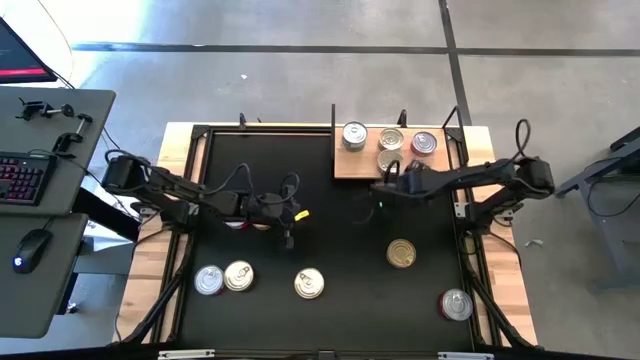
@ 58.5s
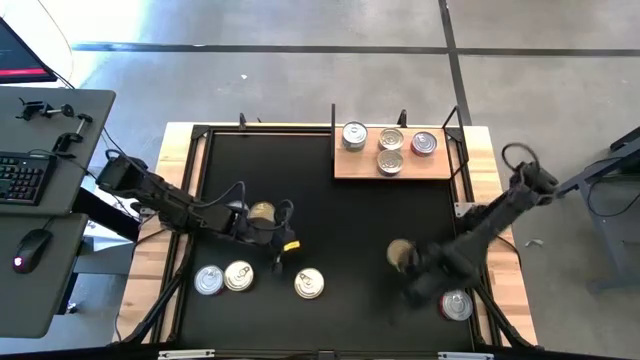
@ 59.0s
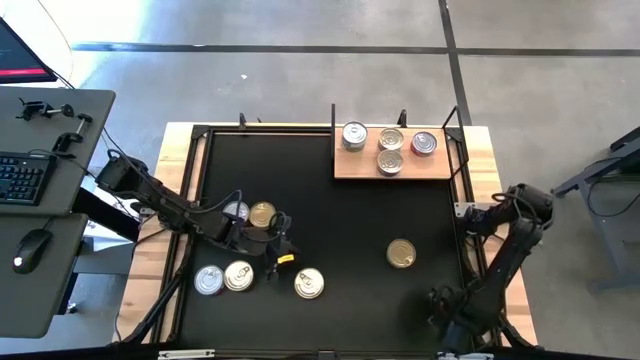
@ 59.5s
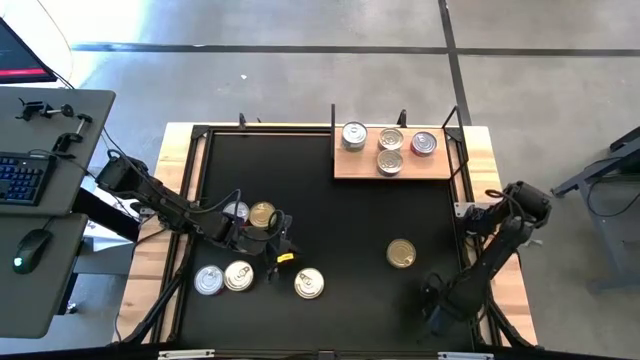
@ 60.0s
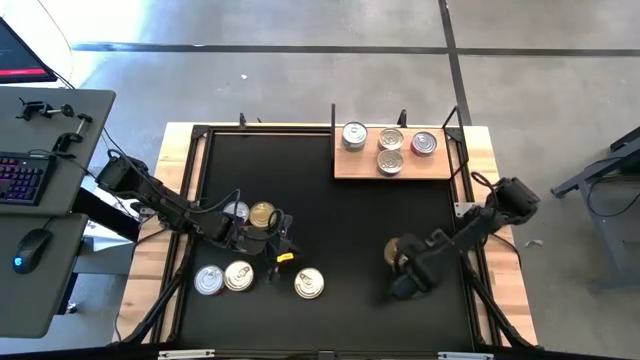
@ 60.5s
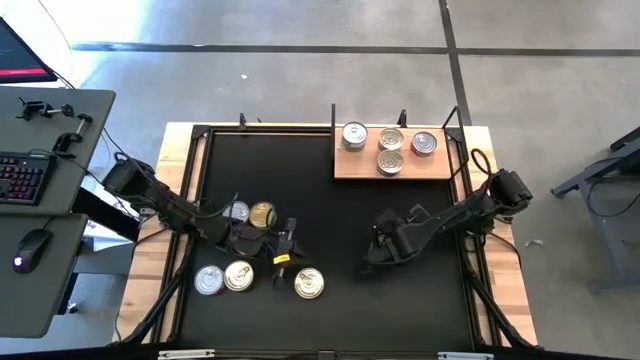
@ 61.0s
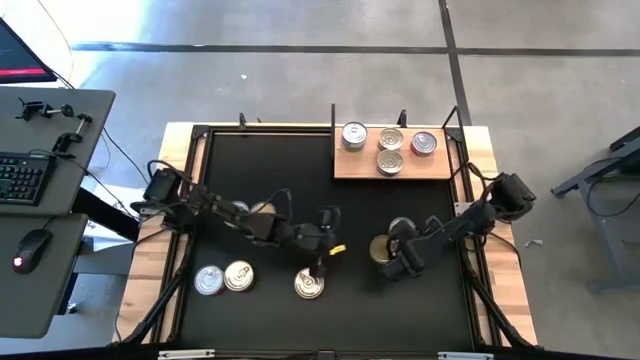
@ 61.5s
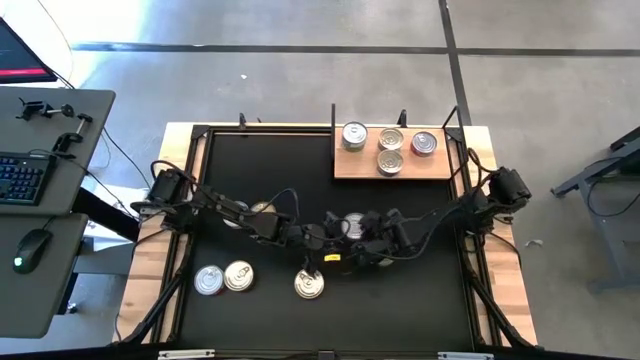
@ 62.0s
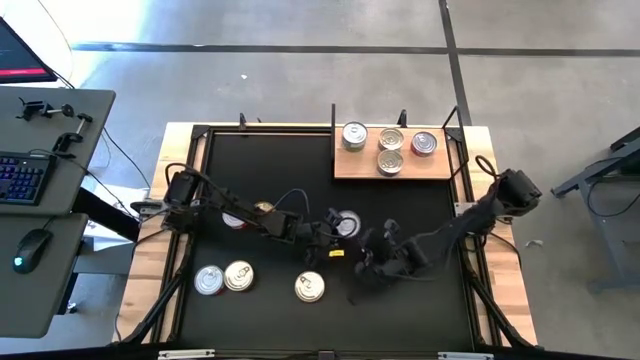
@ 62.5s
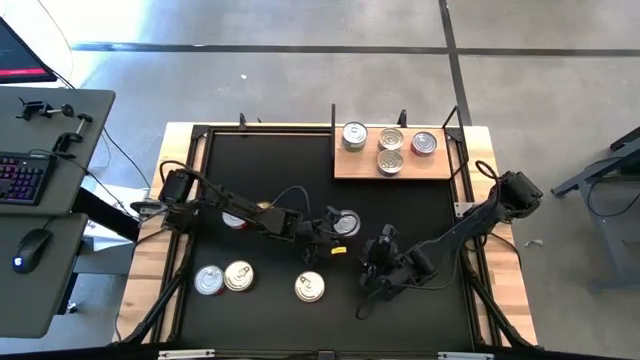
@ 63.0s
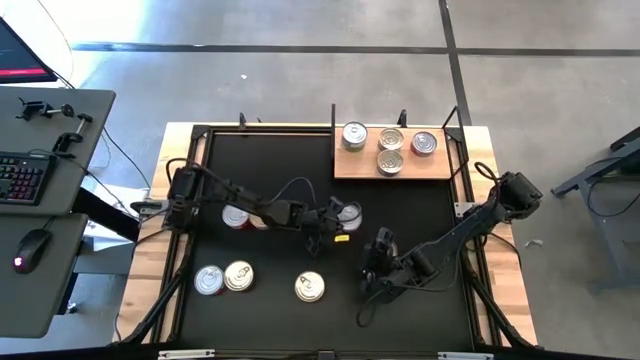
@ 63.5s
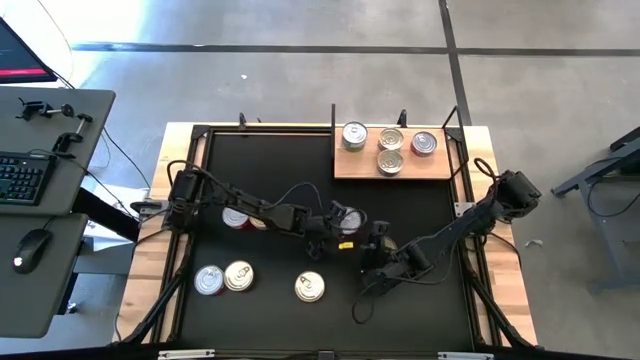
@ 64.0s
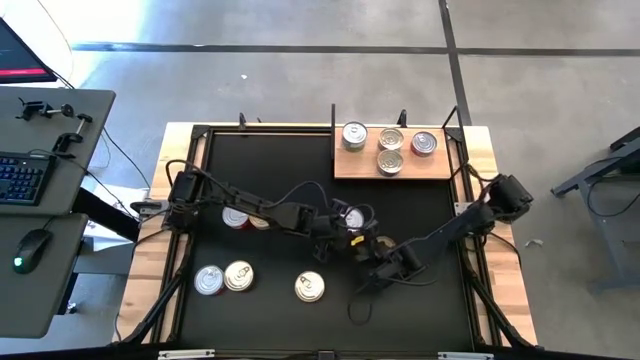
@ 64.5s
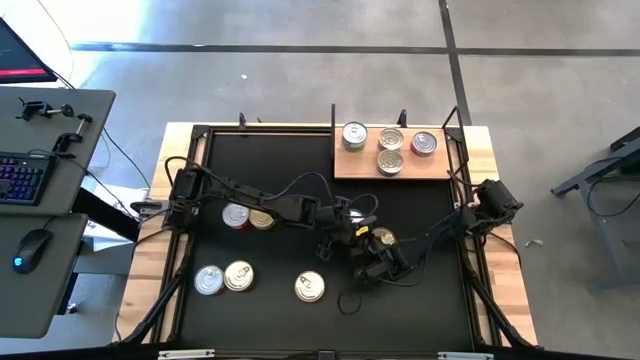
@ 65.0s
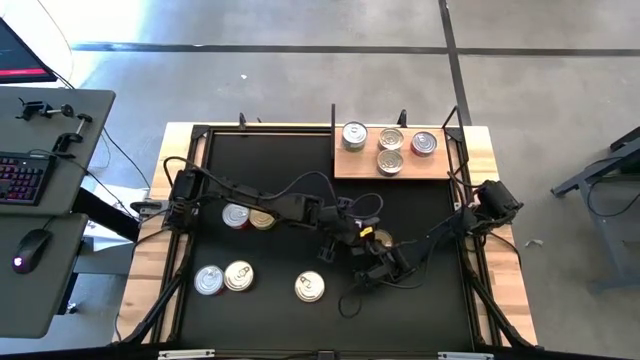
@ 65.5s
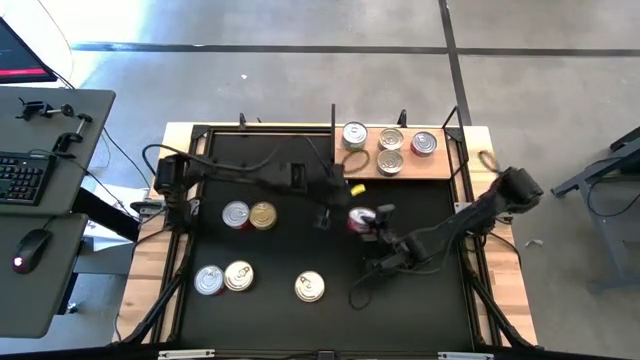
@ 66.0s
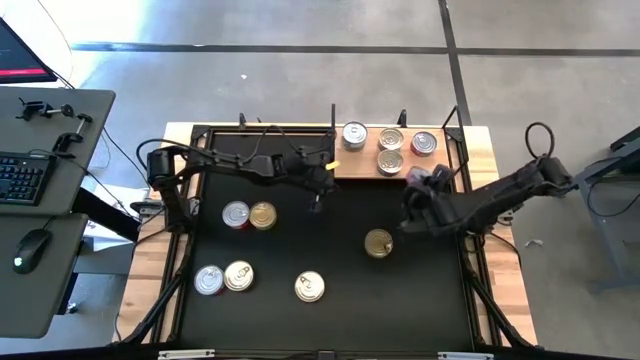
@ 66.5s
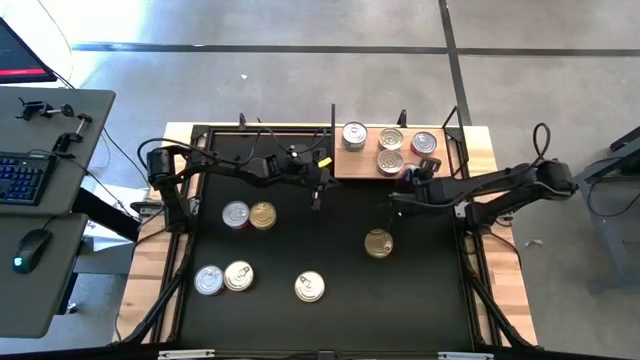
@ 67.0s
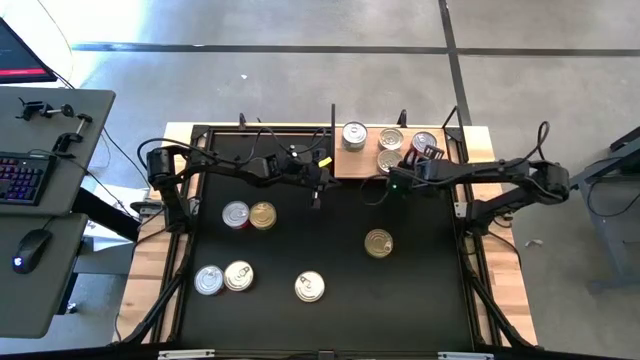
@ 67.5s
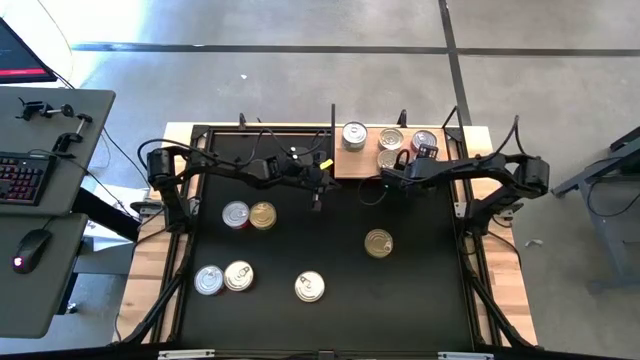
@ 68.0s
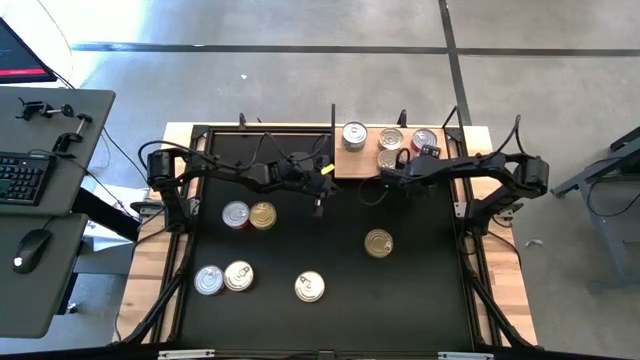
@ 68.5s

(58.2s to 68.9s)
Task: Stack canned seafood by type on shelf
Put the red tuna can on the shelf

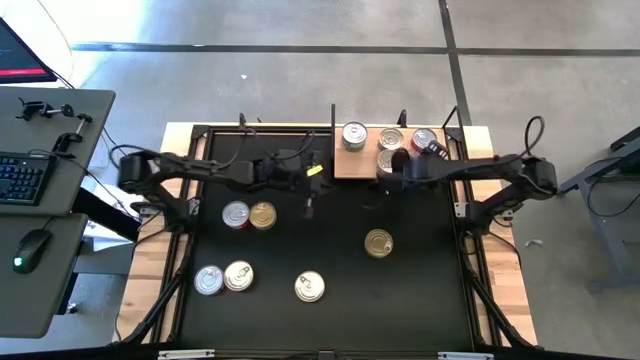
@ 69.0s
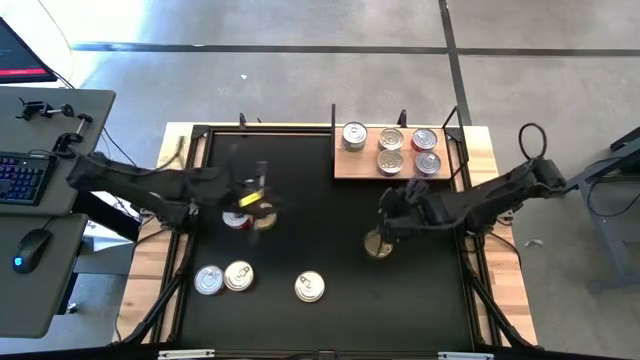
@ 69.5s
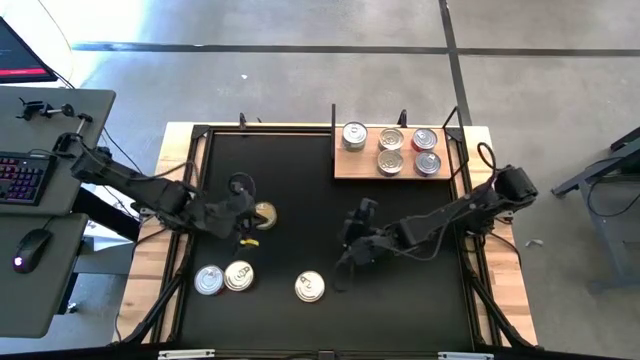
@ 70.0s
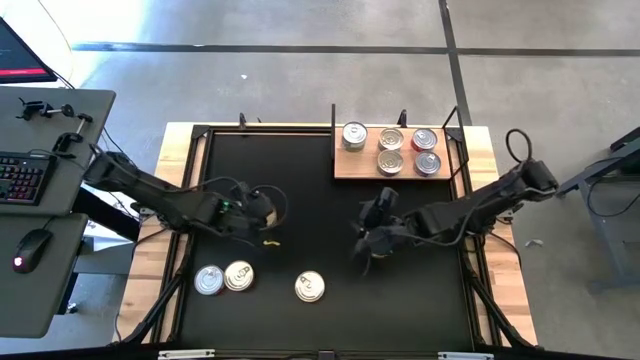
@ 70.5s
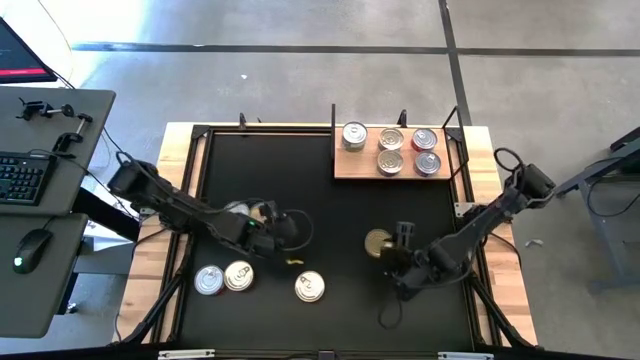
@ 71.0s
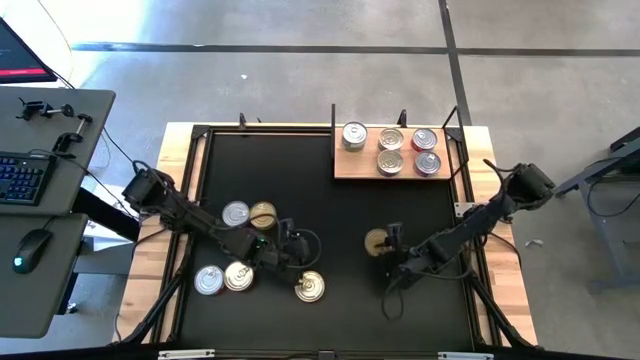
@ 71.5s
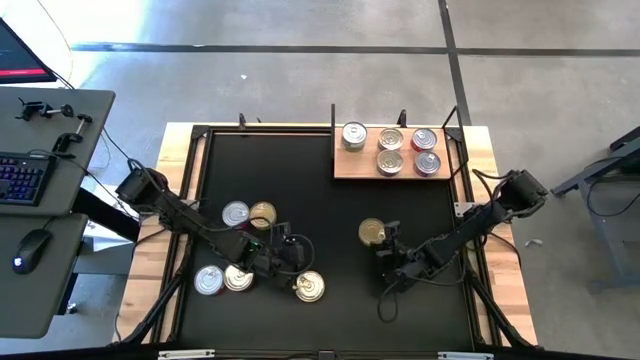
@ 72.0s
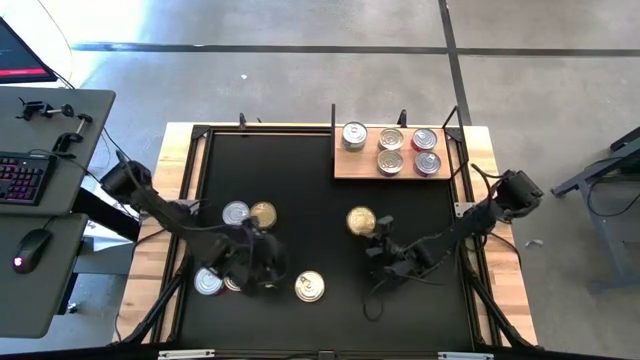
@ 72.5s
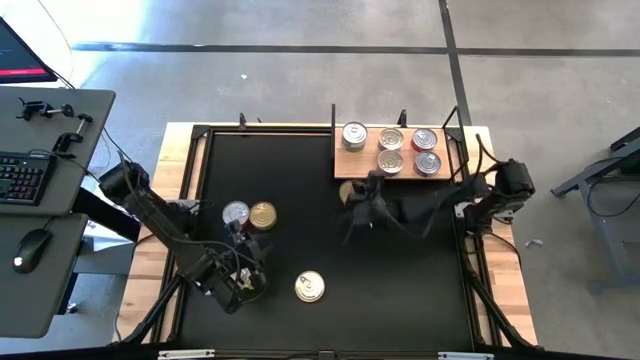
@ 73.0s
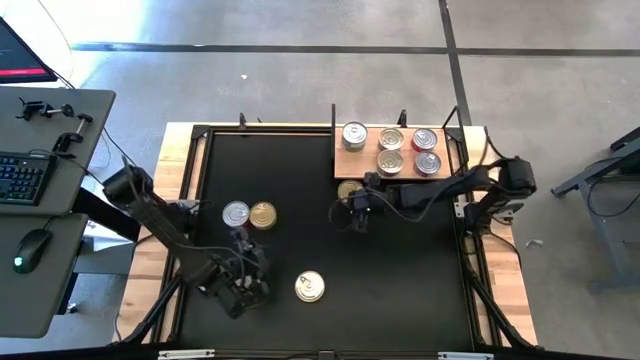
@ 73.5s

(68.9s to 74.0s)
Put the green tuna can on the shelf

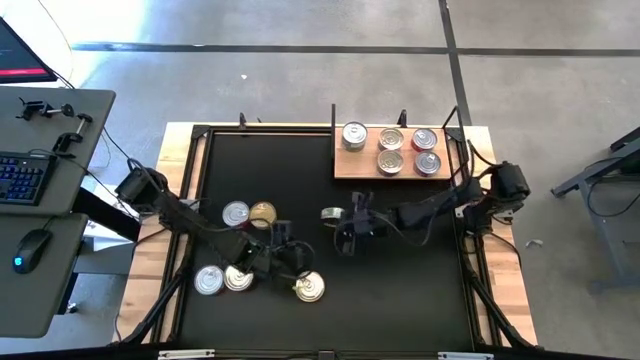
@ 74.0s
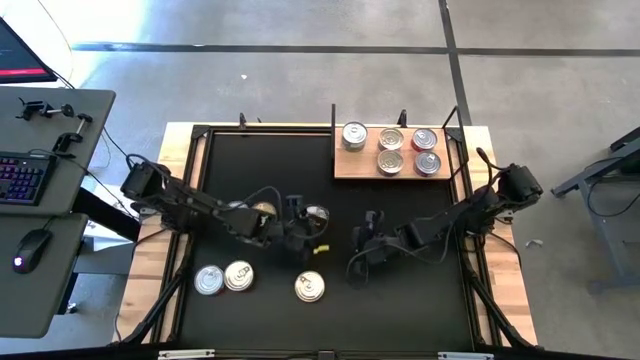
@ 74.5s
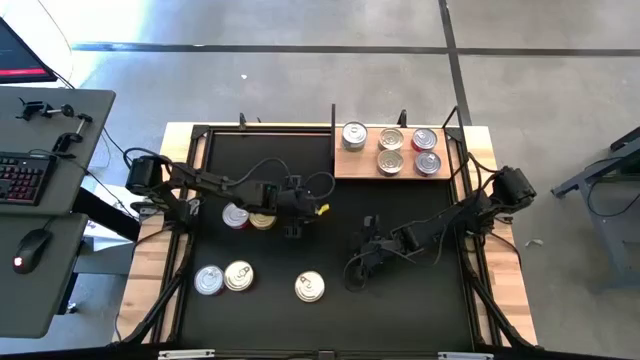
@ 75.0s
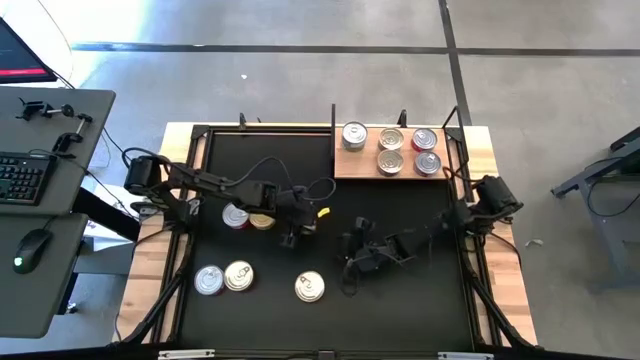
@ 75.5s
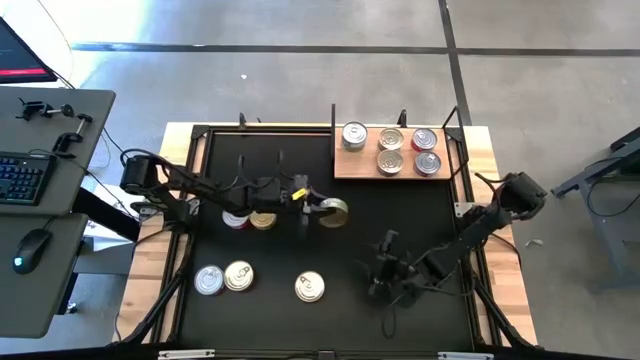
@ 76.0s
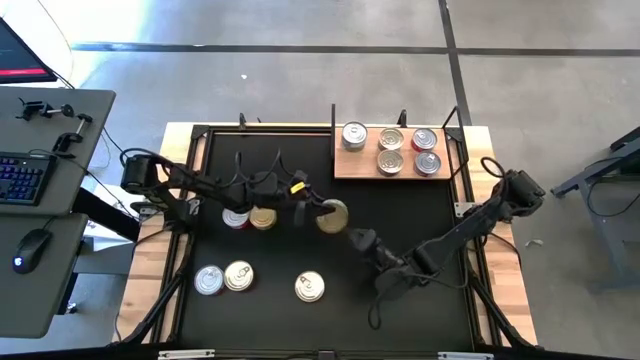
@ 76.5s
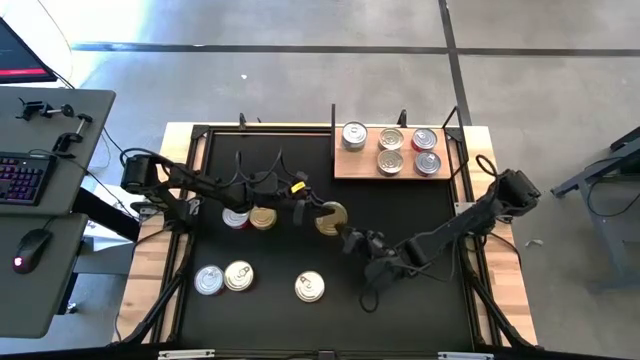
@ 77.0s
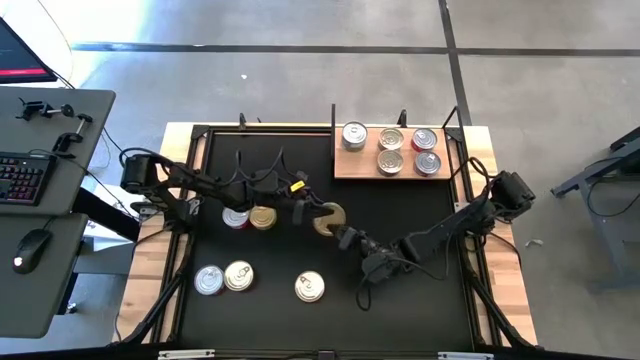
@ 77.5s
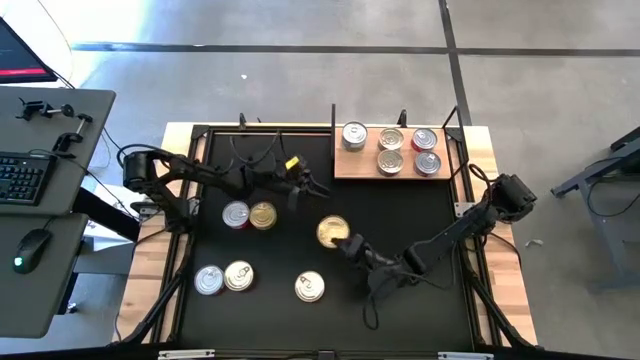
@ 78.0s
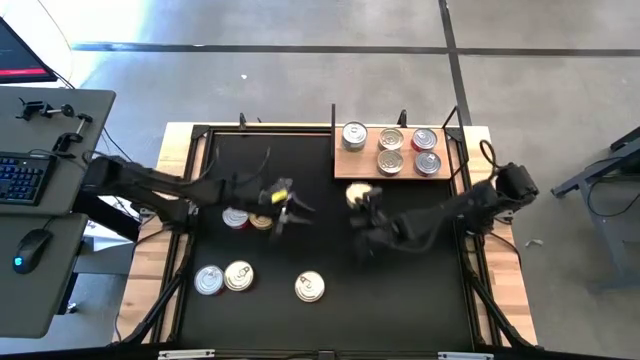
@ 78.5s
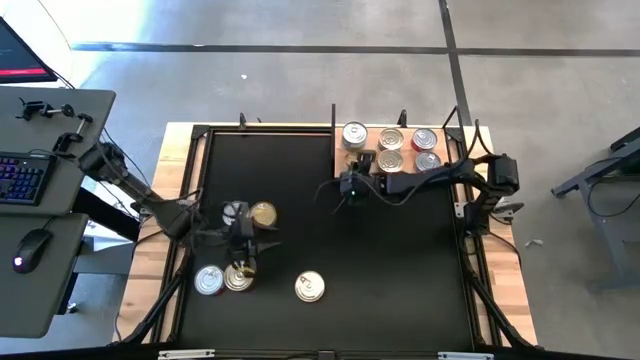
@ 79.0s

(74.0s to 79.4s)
Put the green tuna can on the shelf

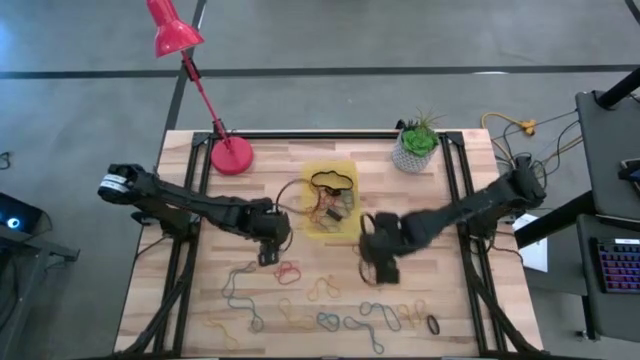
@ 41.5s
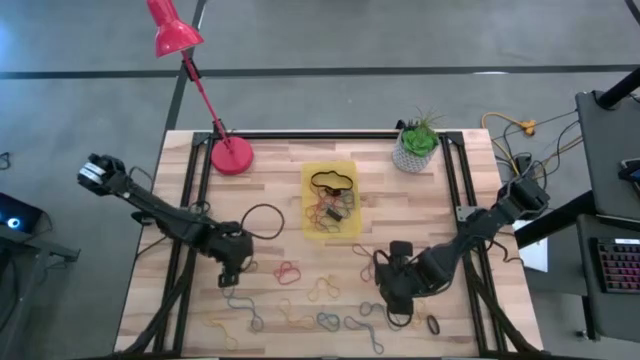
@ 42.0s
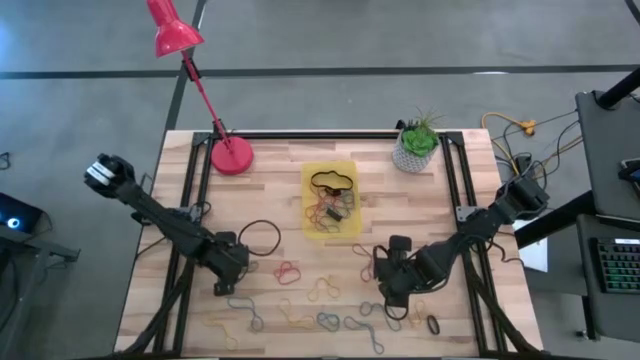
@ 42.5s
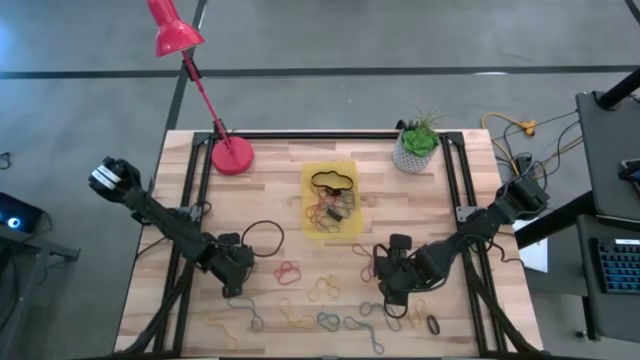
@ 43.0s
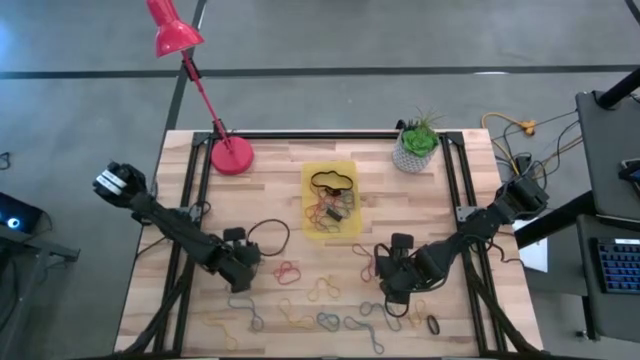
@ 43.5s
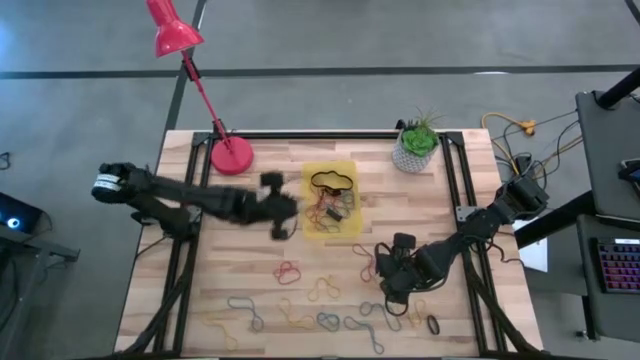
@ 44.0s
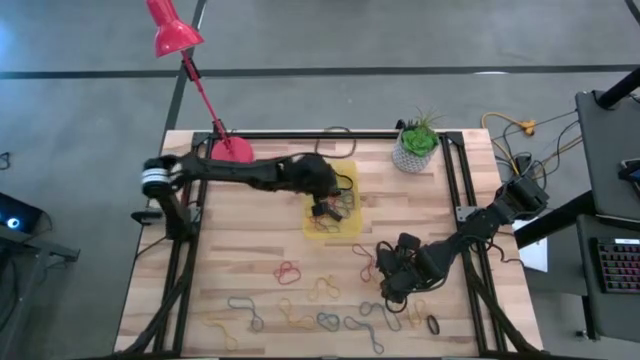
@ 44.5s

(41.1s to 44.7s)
Task: Pick and place rubber bands into bin
Put the blue rubber band into the yellow bin
